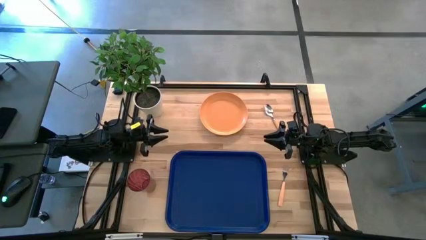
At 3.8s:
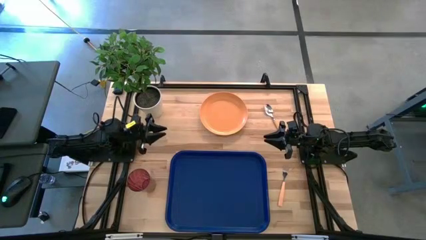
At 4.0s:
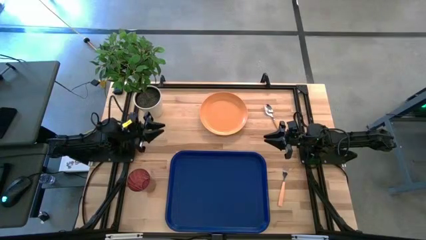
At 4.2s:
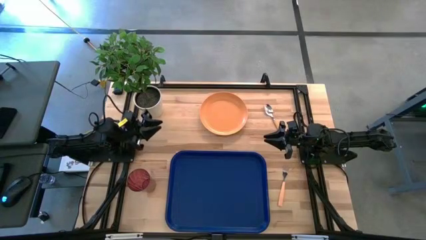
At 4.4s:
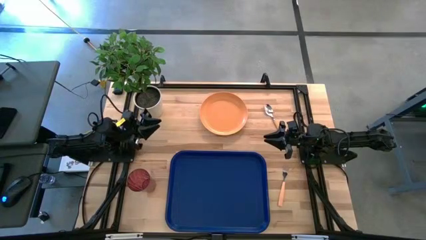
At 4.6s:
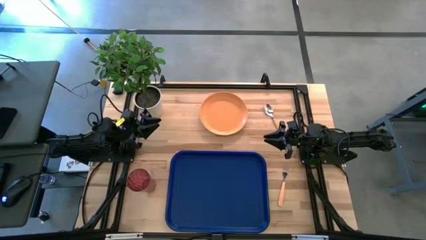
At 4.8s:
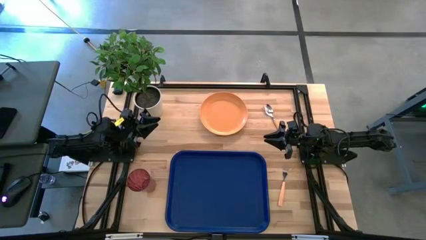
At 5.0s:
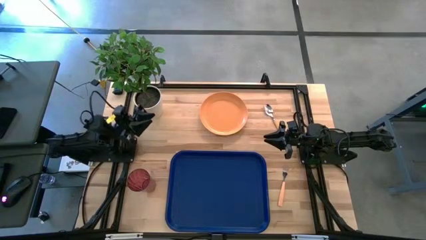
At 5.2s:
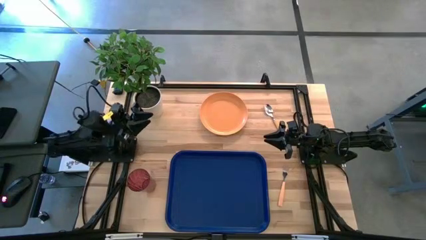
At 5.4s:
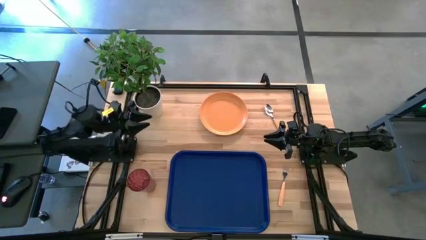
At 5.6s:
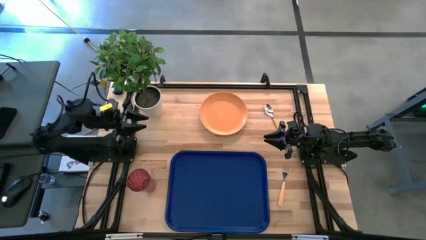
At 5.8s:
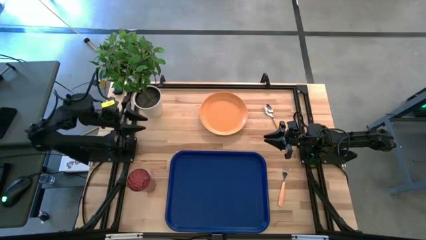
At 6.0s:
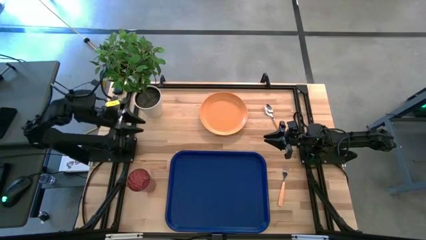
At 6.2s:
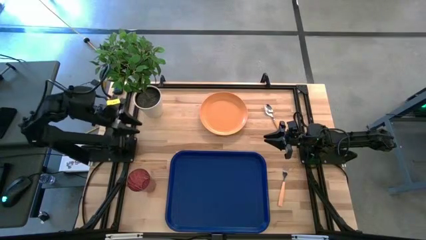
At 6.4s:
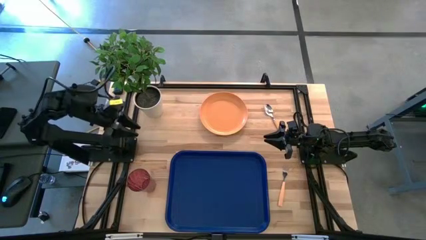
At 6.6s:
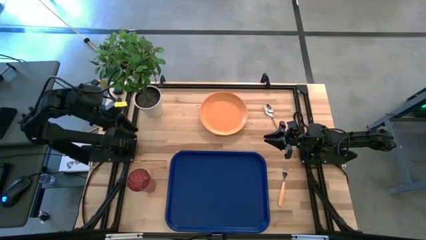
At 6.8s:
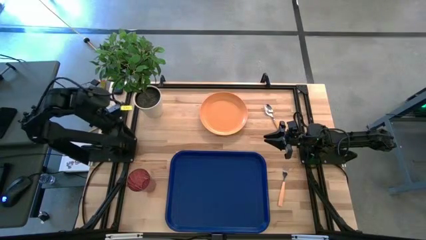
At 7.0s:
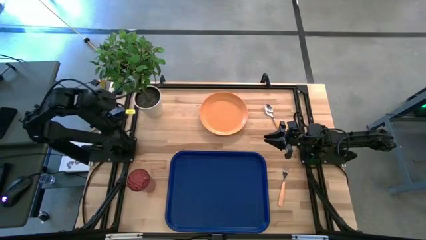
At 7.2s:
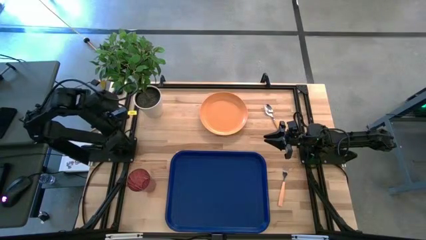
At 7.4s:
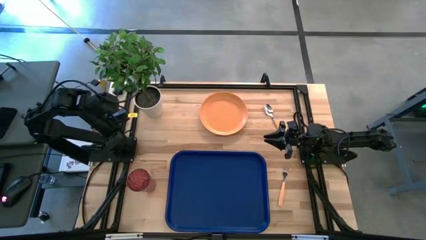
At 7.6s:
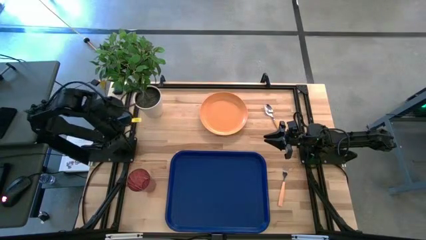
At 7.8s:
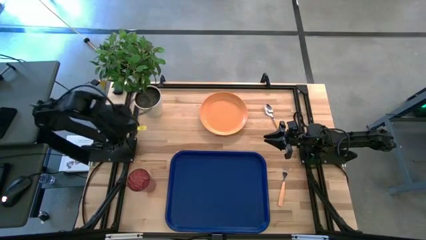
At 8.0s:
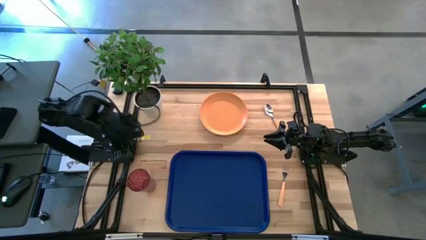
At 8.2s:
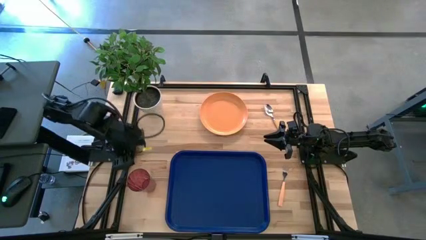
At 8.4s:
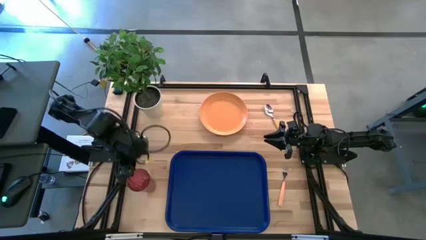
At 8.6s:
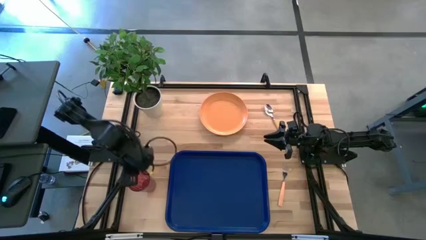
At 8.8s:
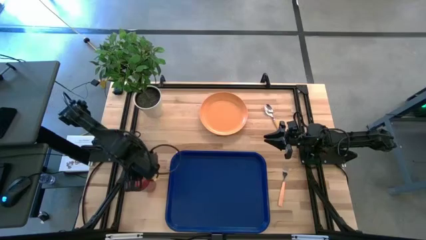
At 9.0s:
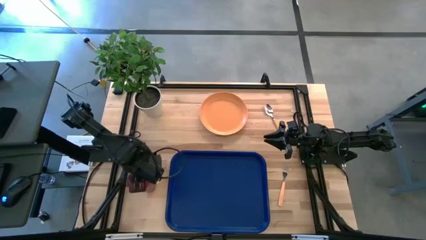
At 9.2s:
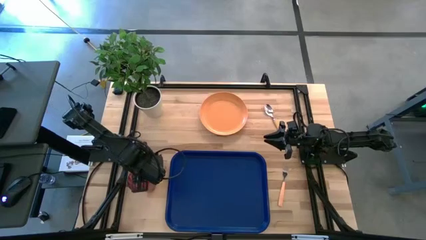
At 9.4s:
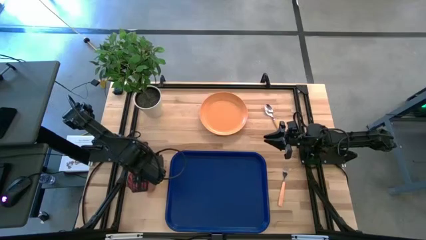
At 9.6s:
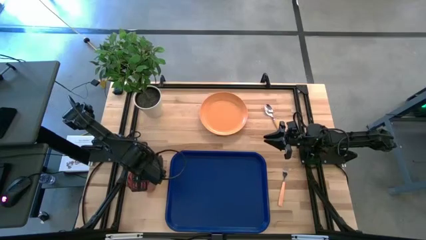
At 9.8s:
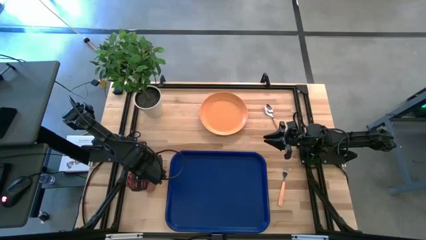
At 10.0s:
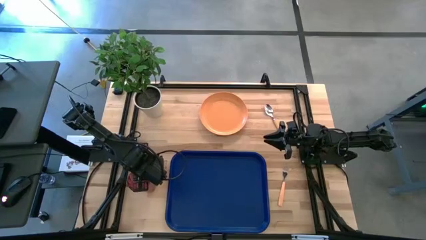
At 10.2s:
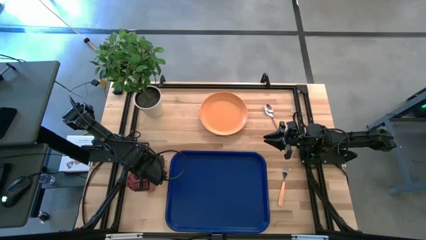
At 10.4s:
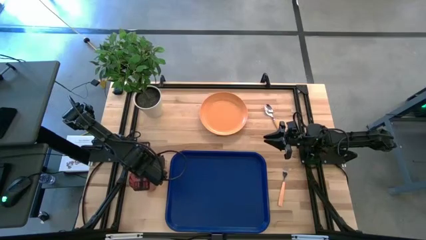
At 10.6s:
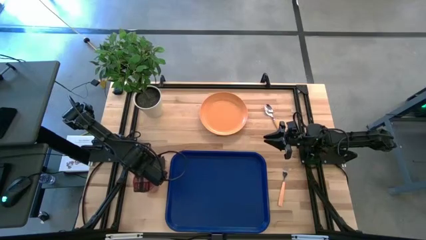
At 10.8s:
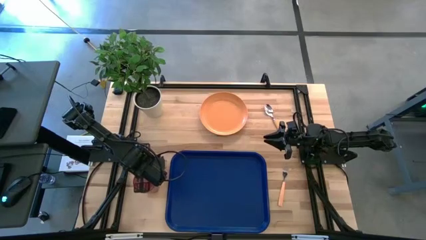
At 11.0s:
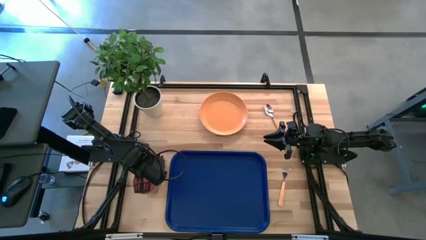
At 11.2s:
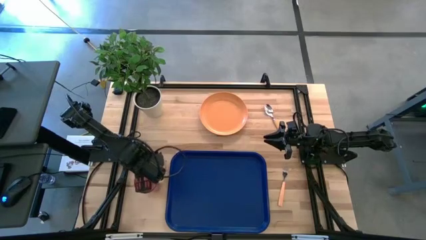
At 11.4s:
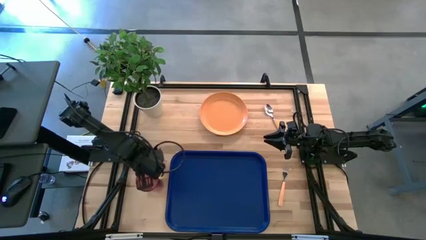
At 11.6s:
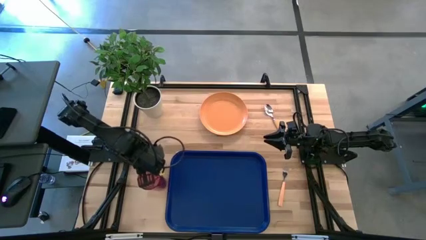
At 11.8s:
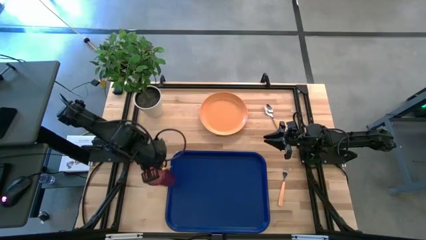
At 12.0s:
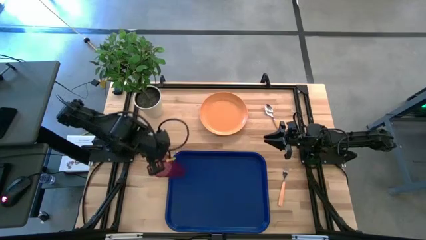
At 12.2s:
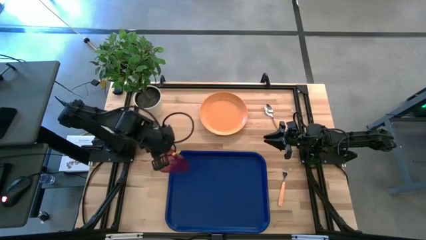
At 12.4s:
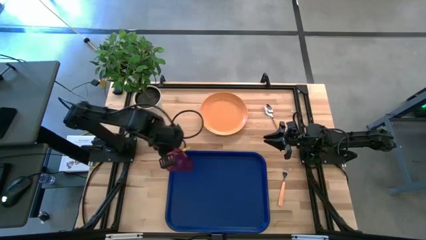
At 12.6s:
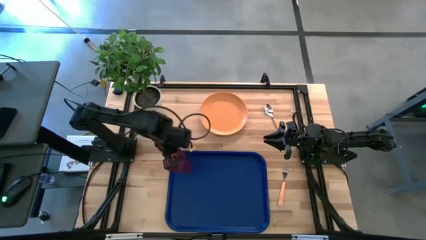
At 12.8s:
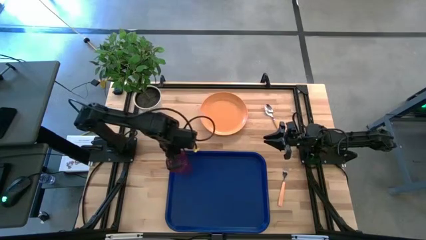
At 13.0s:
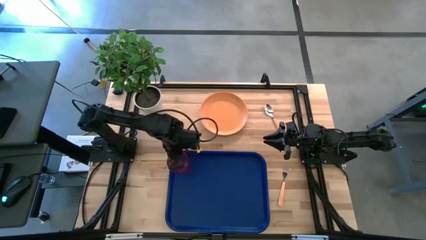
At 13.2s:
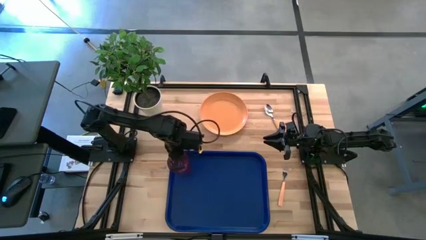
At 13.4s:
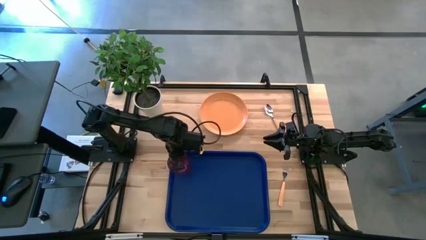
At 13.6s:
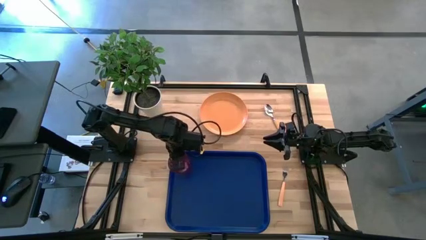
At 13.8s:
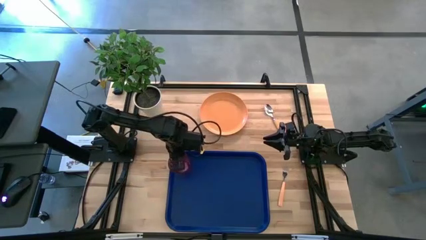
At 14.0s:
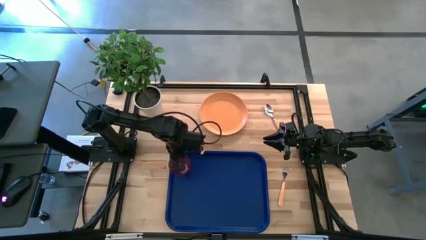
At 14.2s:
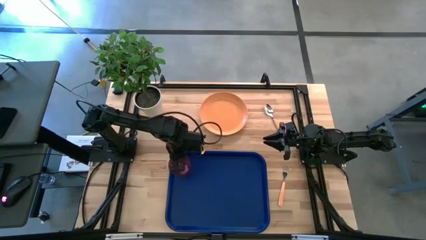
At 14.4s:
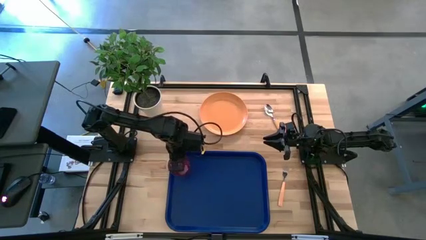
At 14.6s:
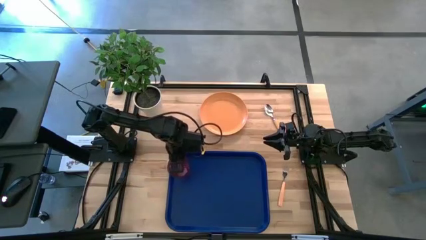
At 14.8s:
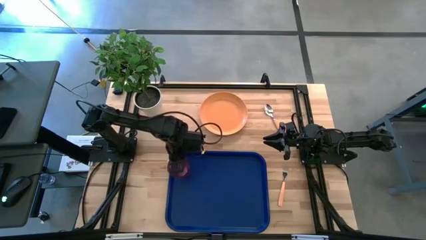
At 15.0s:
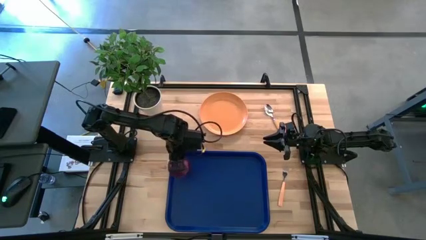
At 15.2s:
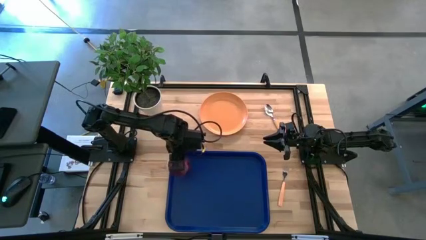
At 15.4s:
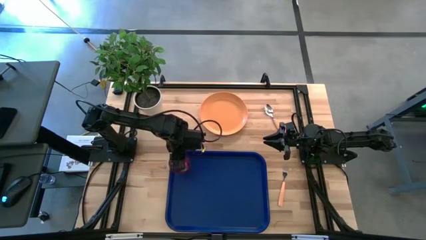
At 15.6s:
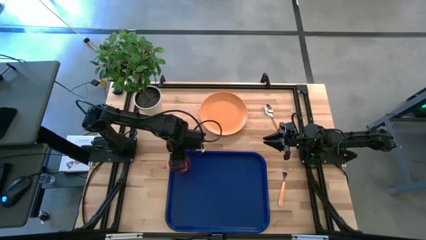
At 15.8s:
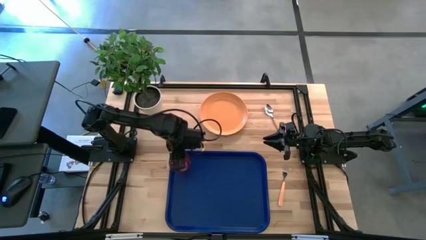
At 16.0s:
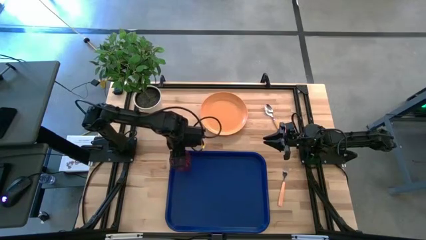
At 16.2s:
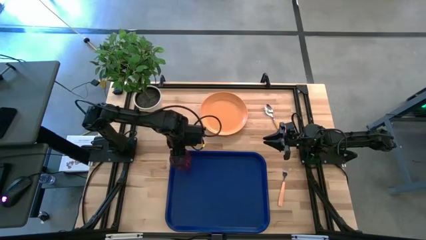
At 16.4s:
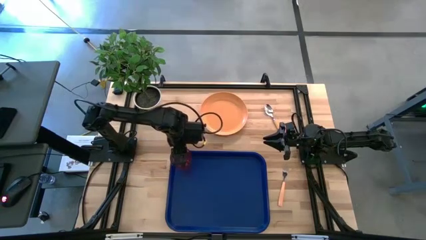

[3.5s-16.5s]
Task: Pick and place plate/cup/fork/spoon on tray
Put the purple cup on the blue serving tray

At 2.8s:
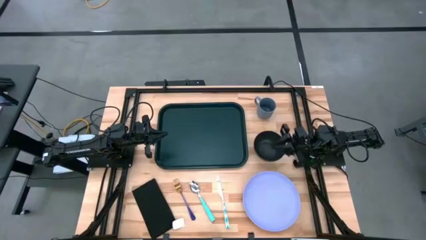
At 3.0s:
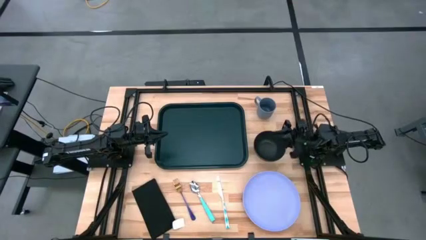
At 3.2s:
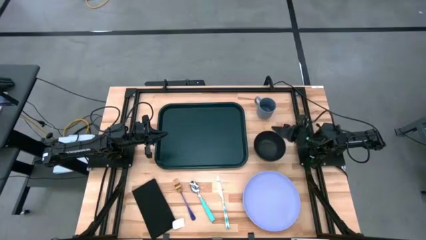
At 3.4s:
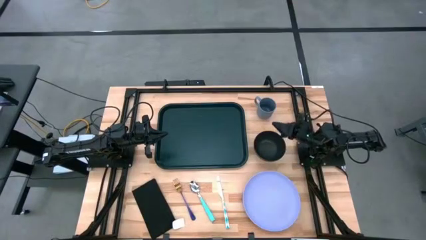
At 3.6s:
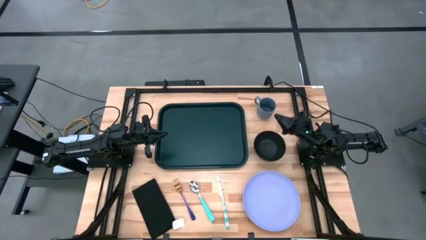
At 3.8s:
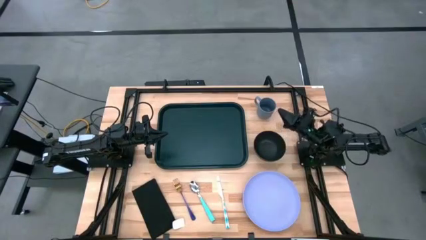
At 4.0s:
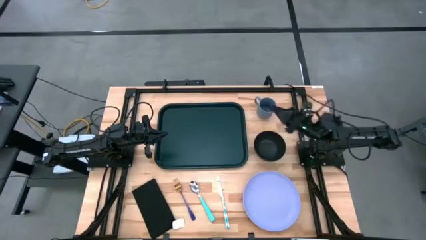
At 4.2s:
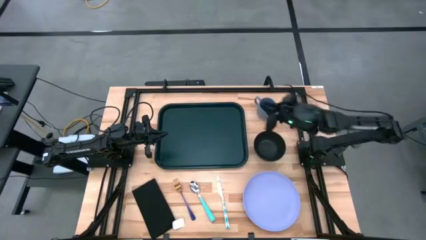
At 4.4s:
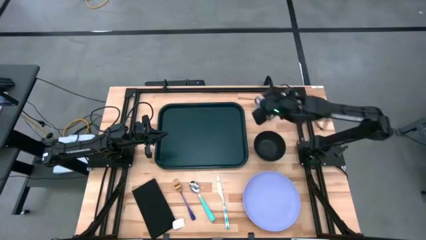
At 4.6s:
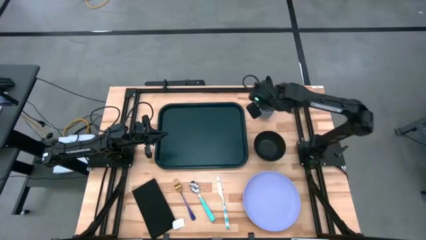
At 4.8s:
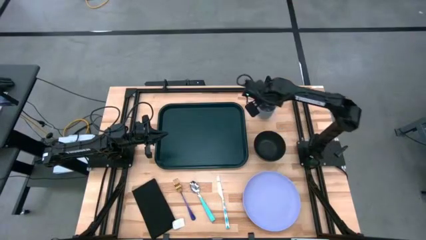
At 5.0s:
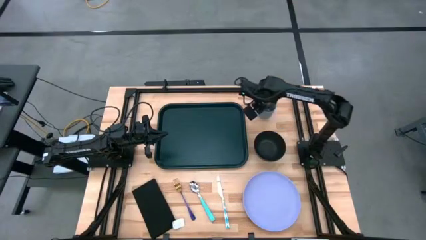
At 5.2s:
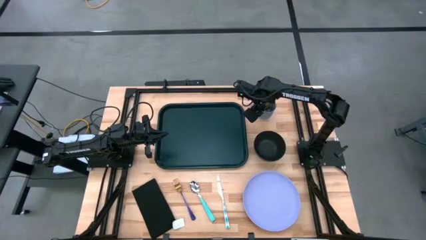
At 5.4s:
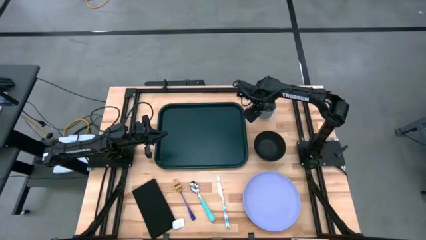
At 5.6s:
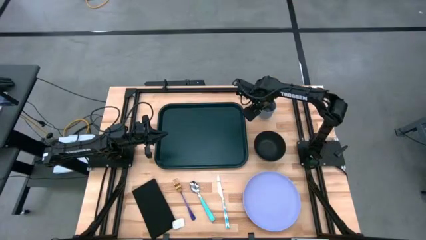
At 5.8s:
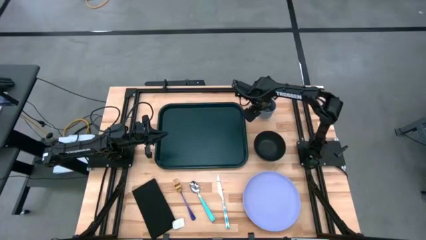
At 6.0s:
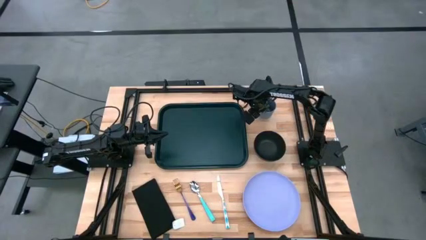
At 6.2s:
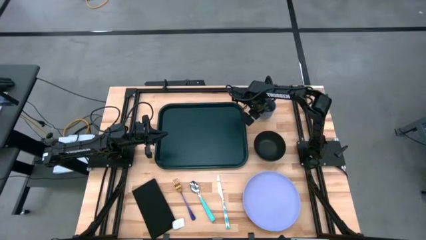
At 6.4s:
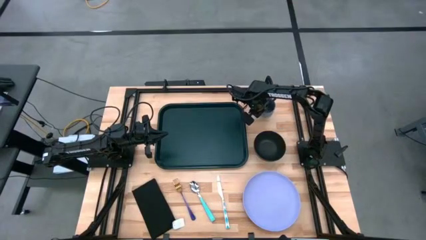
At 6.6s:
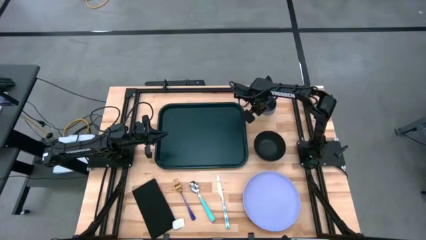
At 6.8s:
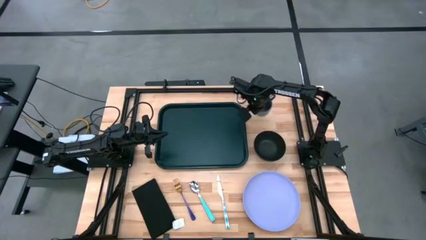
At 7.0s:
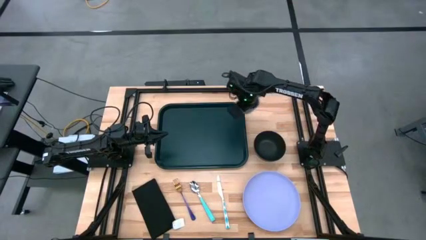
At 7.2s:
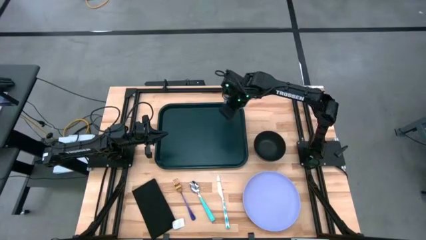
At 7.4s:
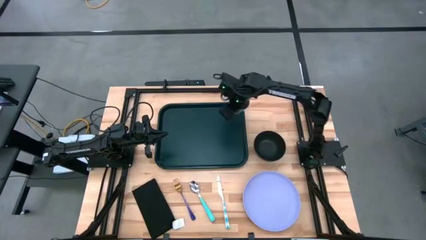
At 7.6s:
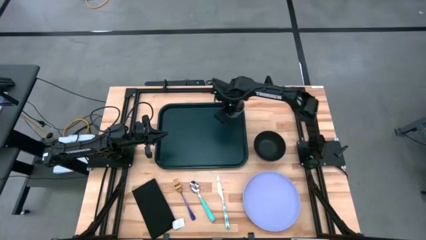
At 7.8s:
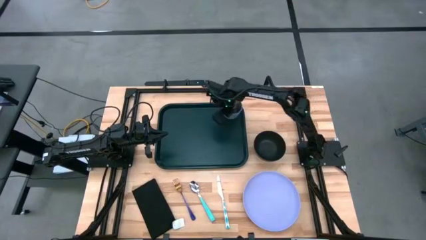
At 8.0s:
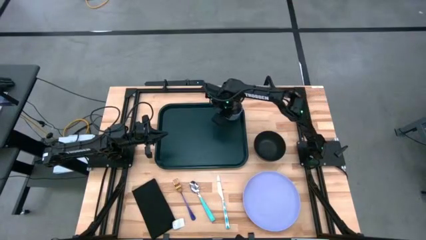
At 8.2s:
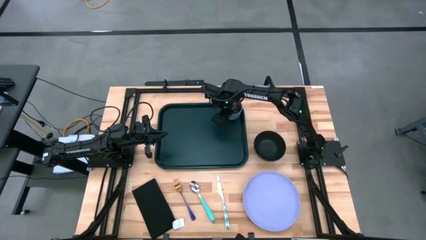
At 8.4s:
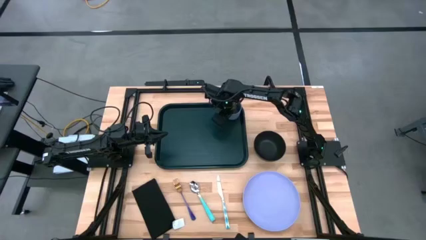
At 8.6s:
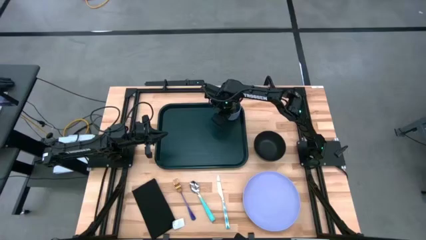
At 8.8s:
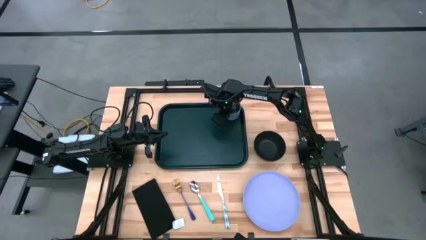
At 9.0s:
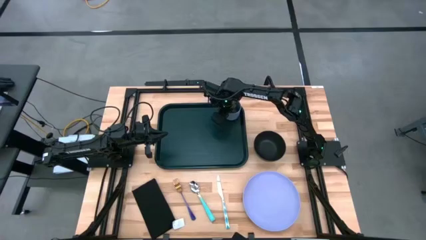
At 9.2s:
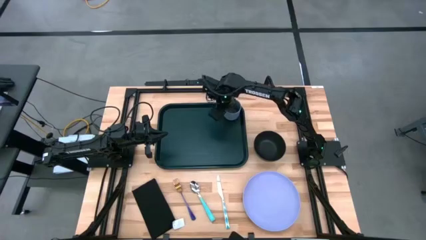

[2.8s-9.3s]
Task: Set up tray
Put the blue mug on the black serving tray
